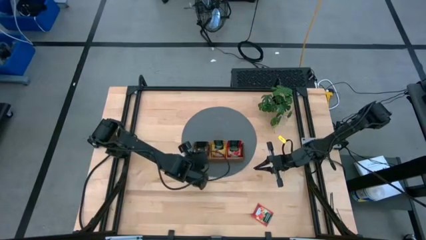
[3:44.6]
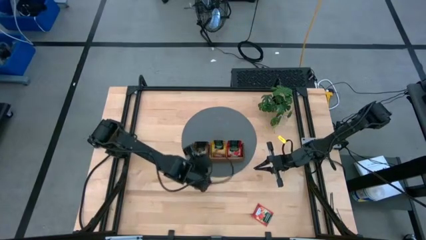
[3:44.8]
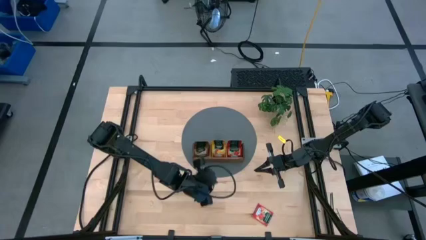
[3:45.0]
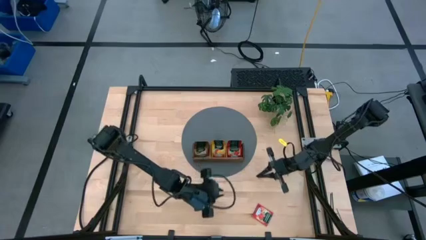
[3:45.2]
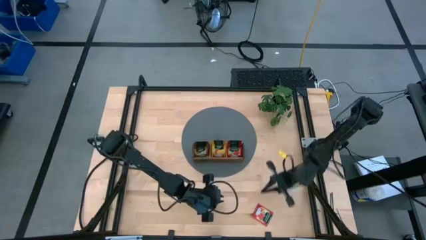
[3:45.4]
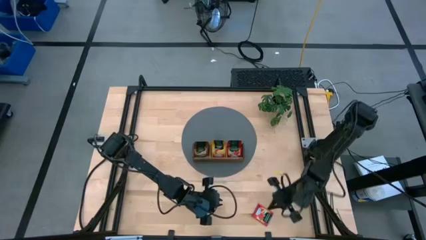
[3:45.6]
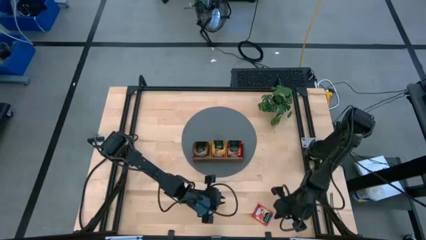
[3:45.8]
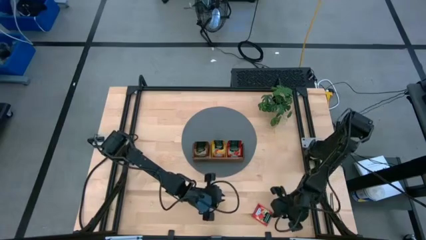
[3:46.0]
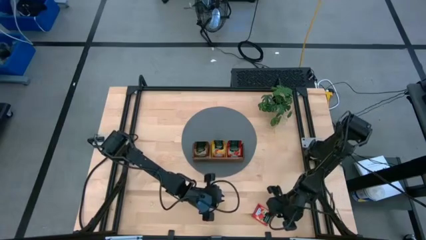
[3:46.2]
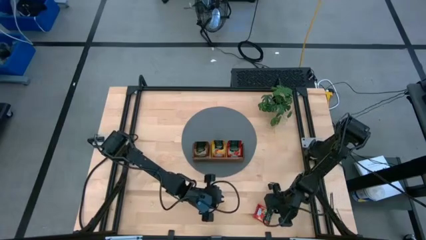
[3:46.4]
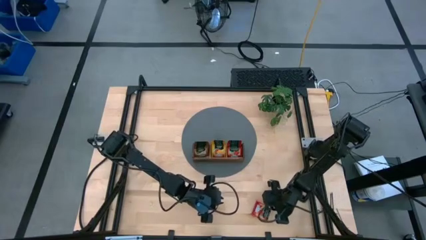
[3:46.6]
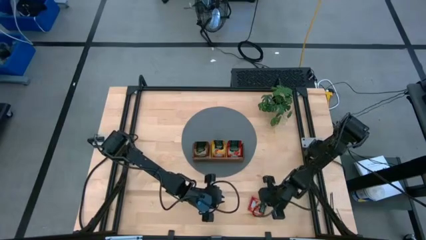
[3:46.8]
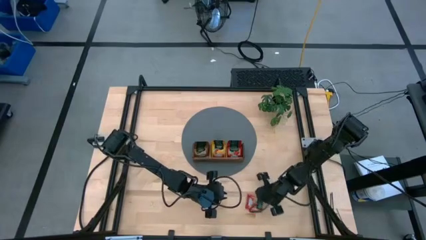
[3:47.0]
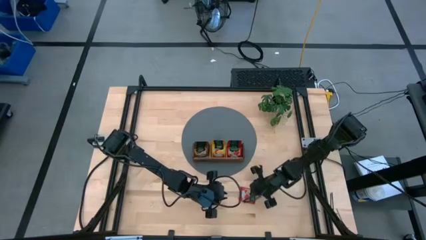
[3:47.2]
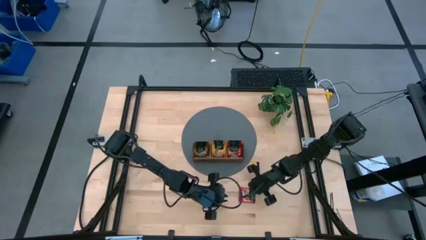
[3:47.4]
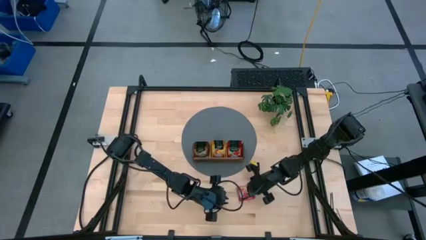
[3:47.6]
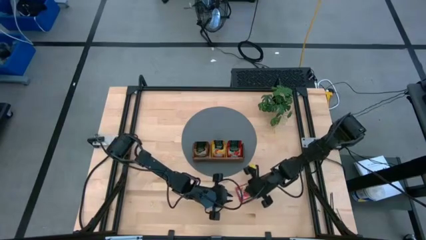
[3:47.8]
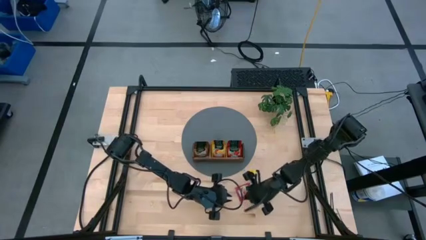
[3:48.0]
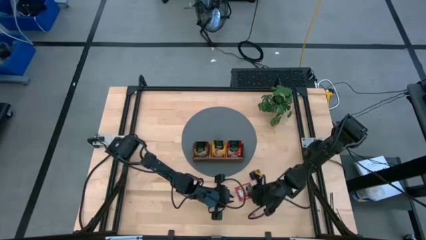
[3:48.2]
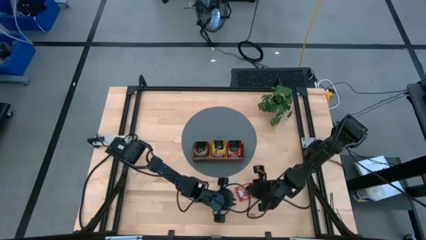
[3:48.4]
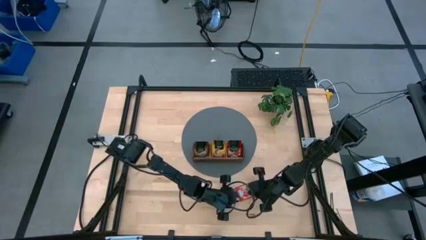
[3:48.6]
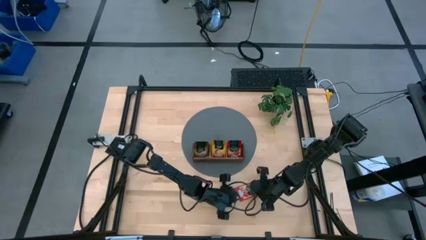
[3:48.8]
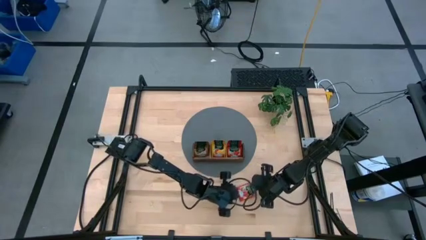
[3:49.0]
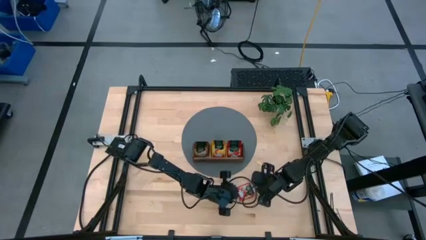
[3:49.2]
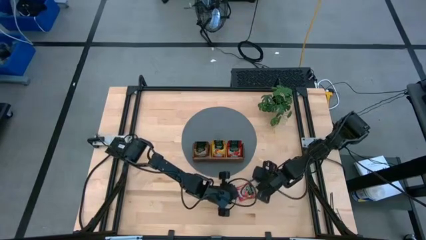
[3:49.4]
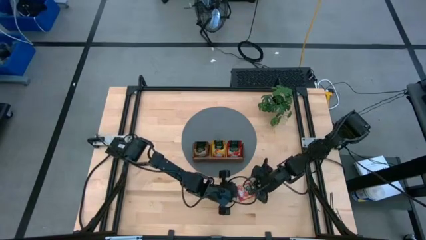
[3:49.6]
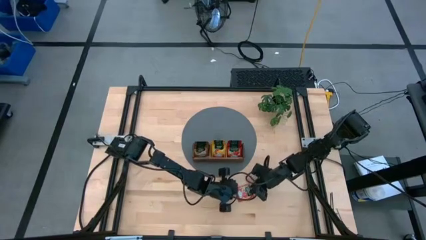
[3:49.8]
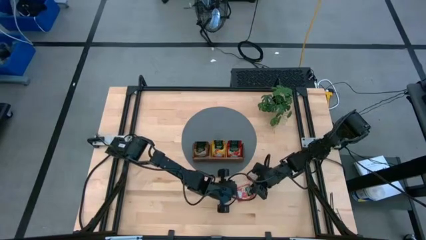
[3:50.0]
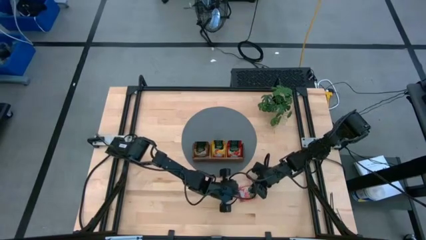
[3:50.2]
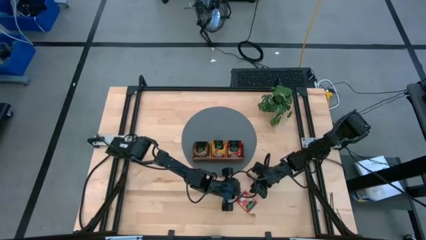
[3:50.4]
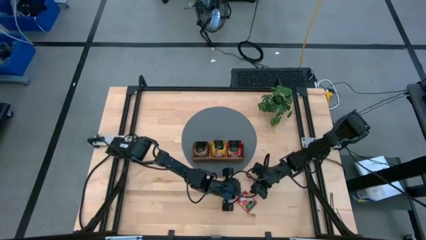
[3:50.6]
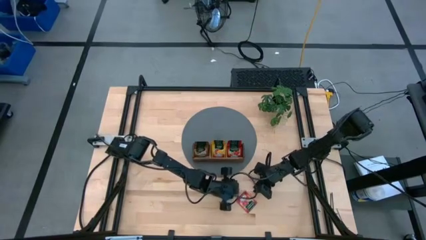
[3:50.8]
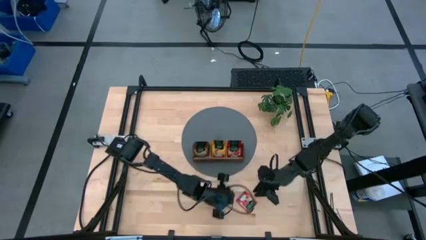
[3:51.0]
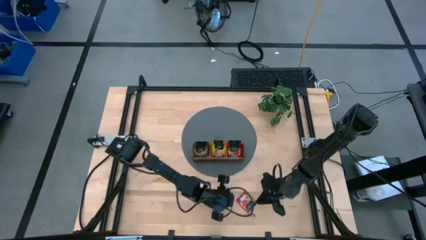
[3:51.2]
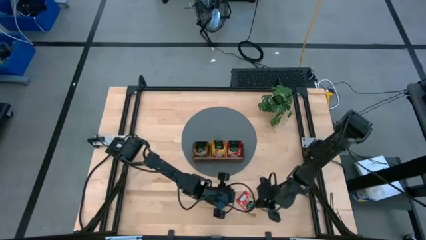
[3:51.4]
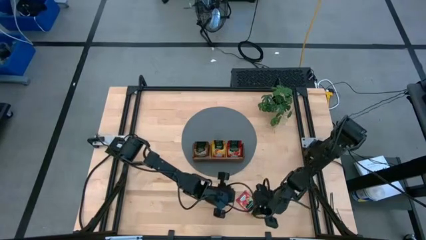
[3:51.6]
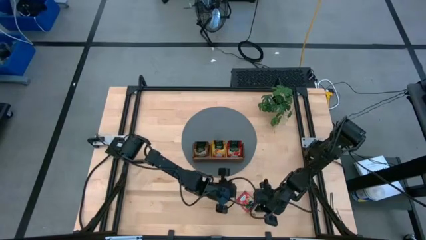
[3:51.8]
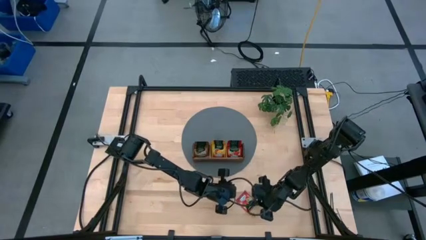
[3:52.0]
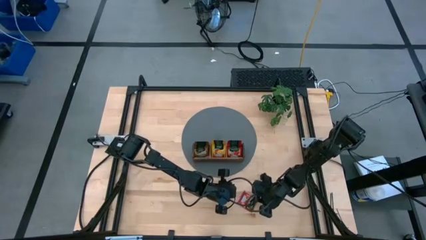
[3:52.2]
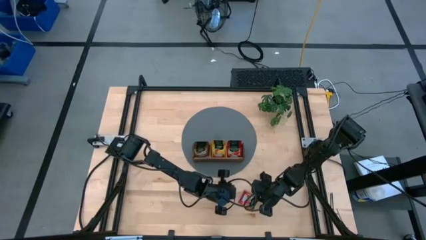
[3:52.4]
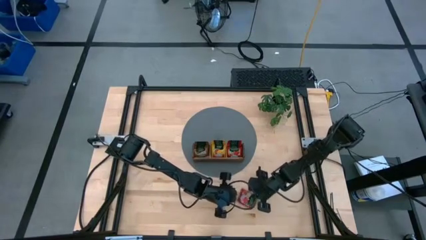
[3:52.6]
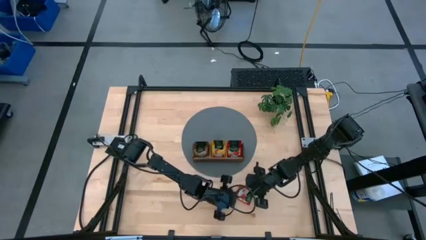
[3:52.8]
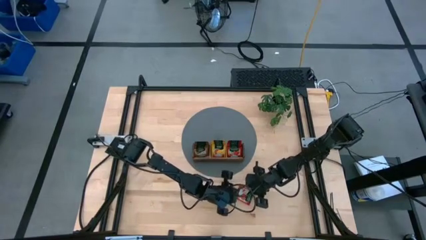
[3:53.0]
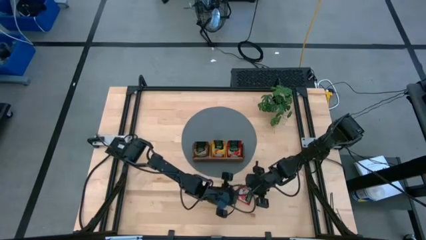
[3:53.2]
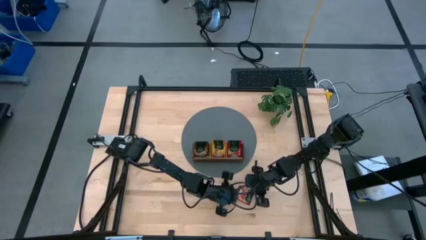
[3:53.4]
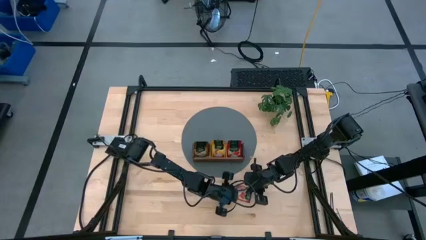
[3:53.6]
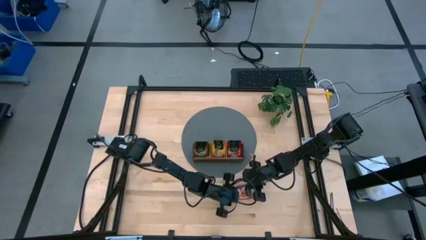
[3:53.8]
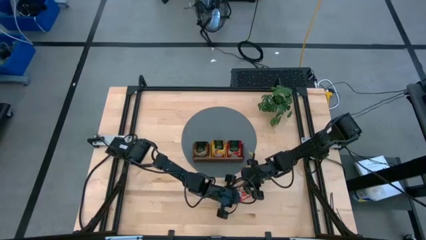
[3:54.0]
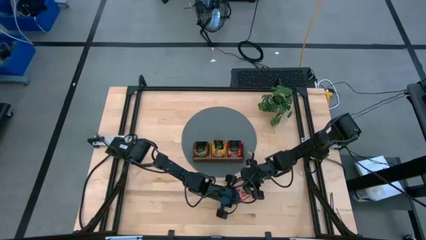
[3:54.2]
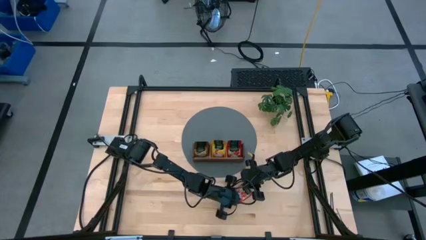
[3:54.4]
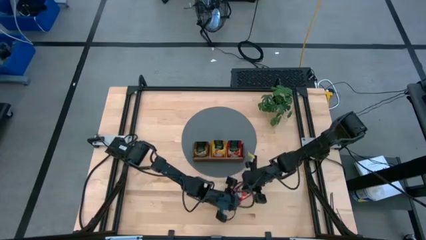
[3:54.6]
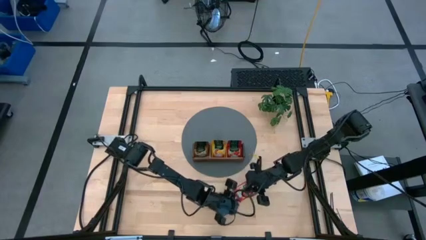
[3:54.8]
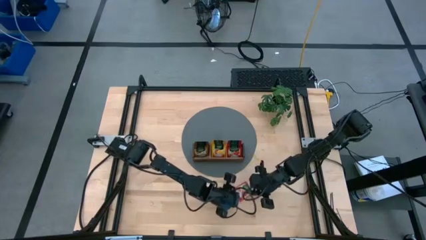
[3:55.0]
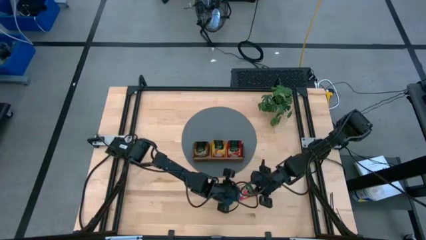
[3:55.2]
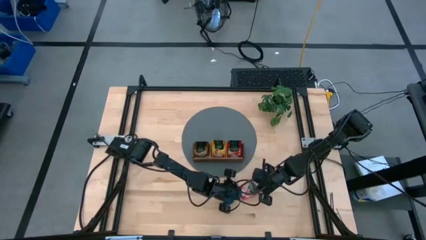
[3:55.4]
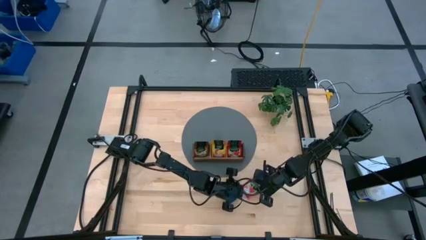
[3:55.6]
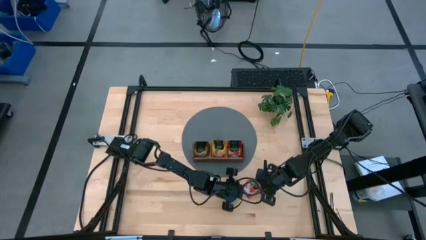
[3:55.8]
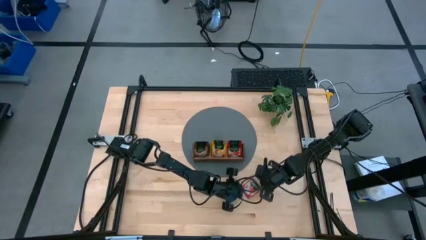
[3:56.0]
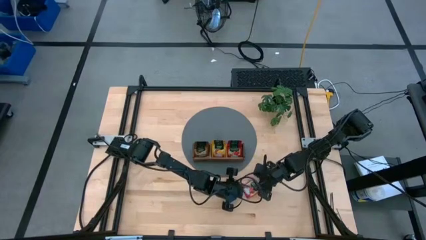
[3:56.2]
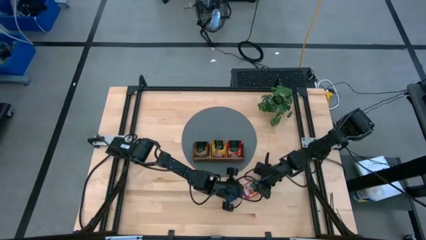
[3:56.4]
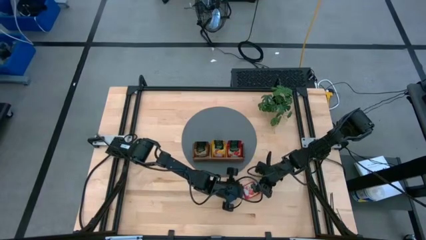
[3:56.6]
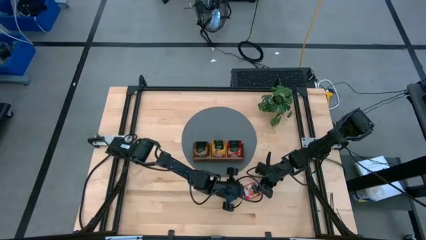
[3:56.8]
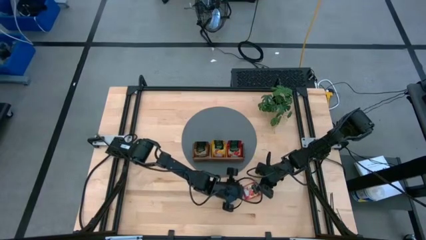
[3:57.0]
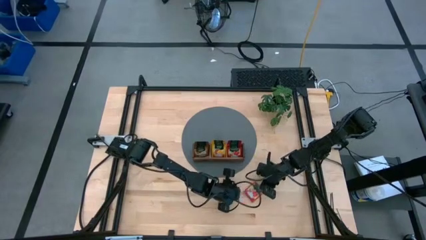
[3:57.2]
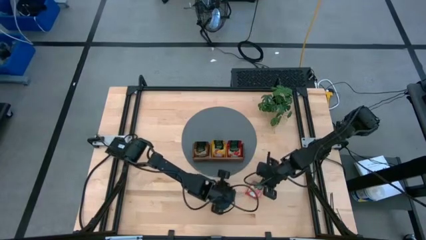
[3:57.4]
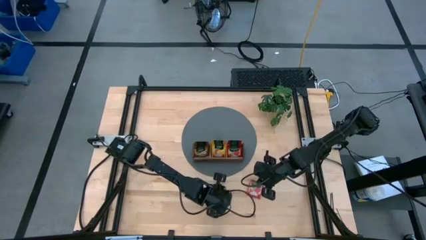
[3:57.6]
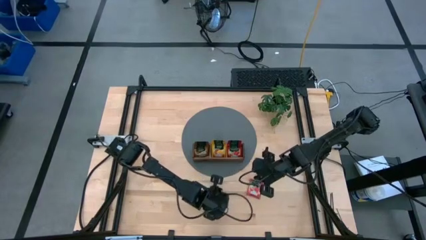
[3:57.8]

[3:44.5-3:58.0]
Task: Pick & Place Tea
Put the red tea bag into the right section of the wooden organizer
